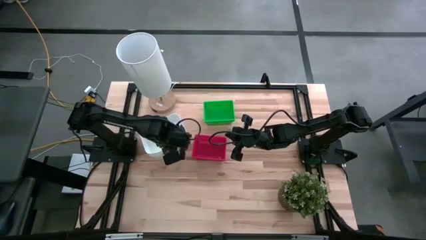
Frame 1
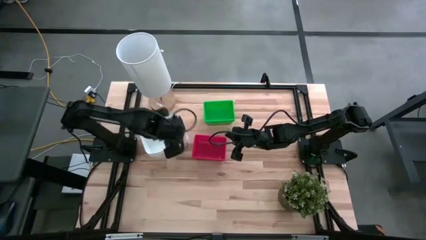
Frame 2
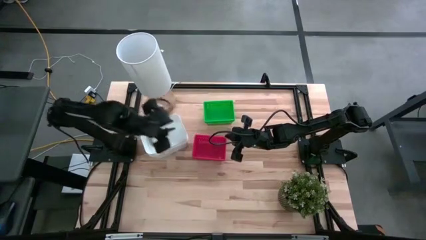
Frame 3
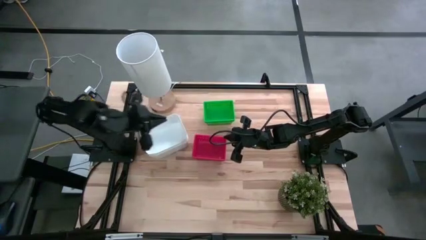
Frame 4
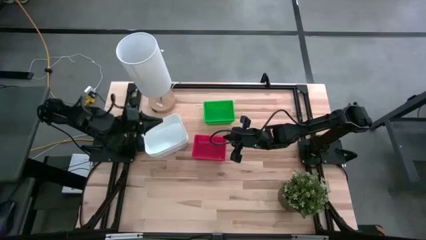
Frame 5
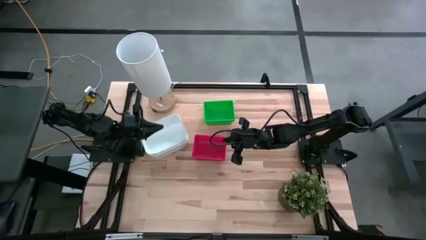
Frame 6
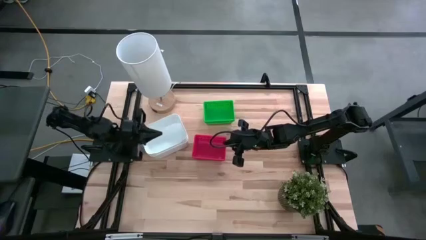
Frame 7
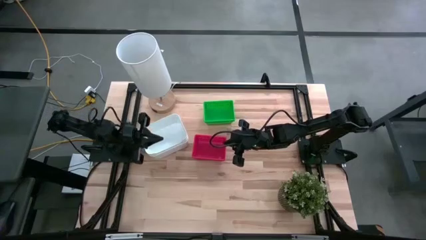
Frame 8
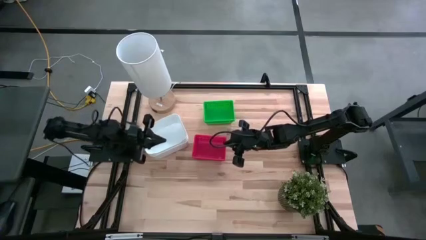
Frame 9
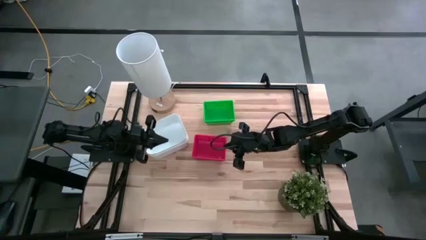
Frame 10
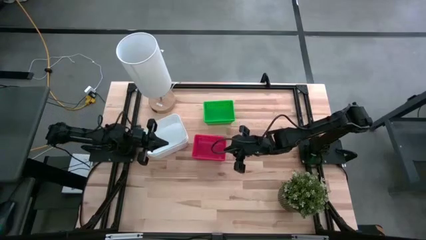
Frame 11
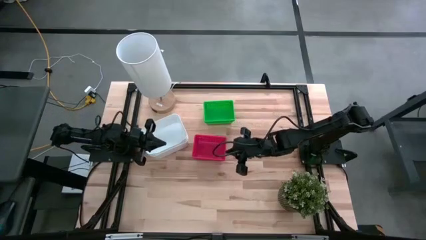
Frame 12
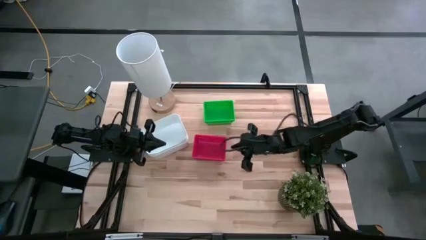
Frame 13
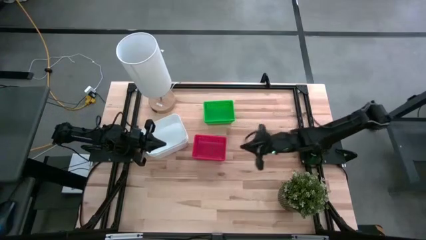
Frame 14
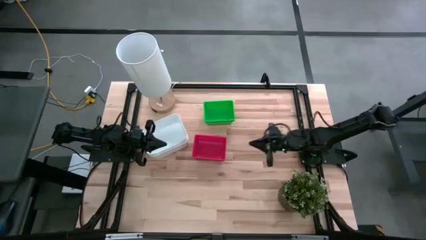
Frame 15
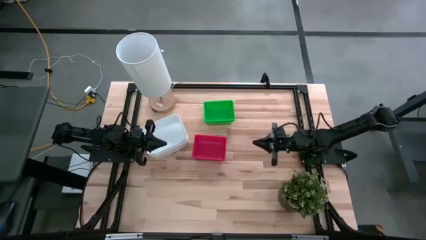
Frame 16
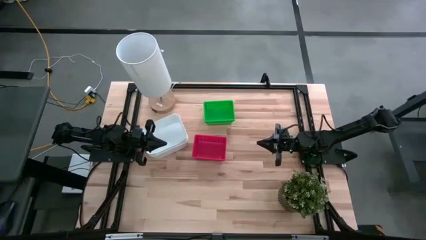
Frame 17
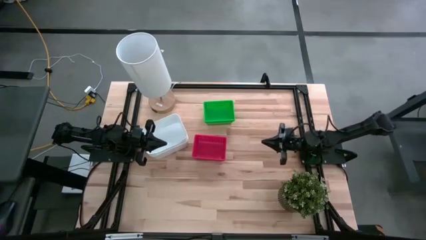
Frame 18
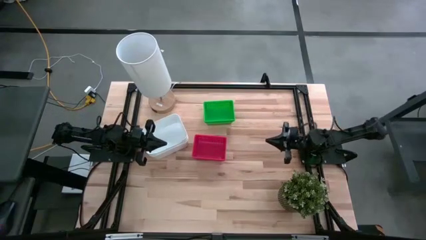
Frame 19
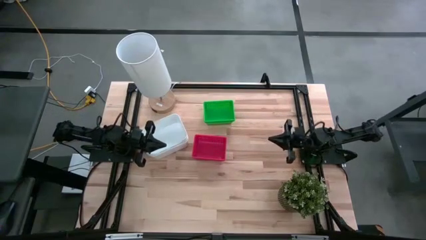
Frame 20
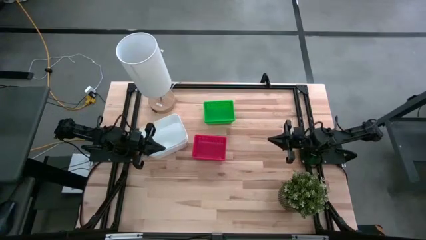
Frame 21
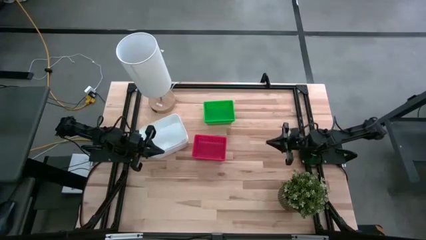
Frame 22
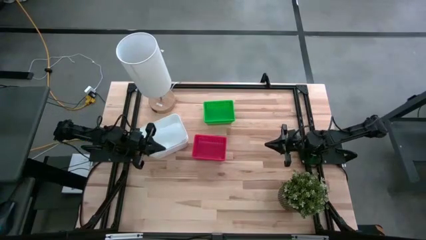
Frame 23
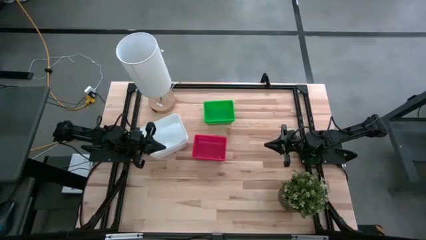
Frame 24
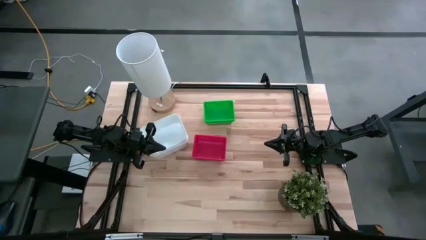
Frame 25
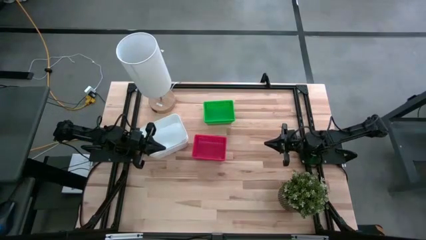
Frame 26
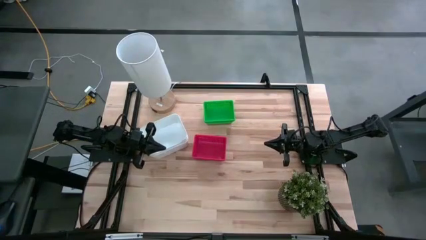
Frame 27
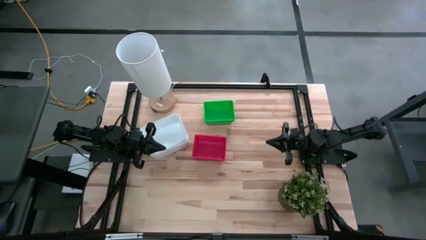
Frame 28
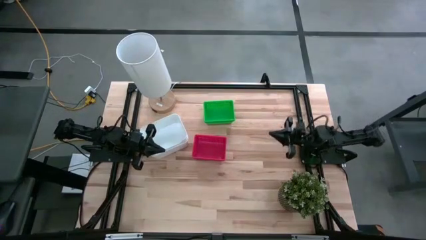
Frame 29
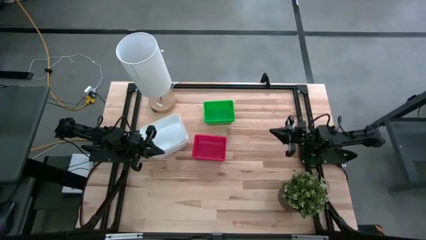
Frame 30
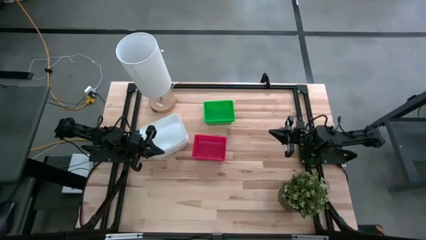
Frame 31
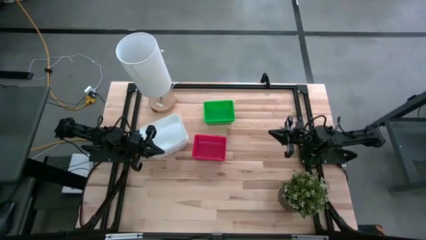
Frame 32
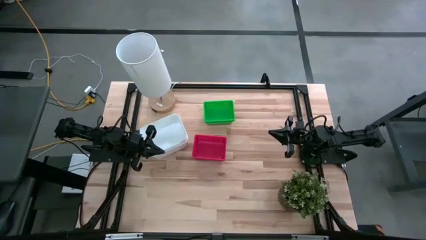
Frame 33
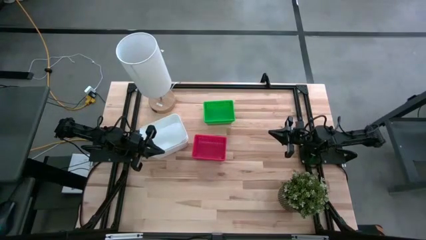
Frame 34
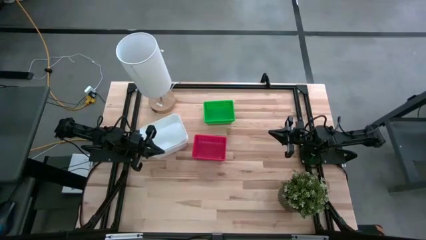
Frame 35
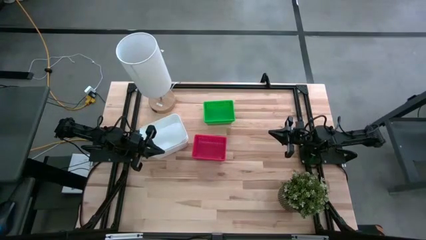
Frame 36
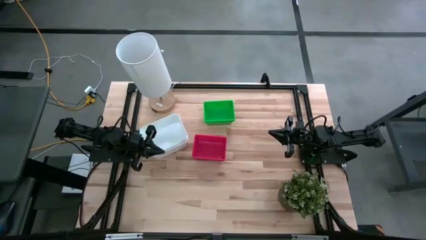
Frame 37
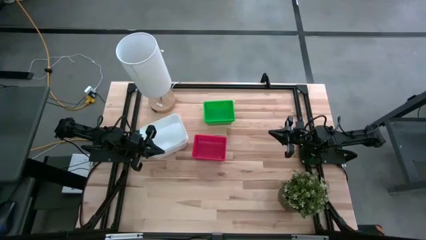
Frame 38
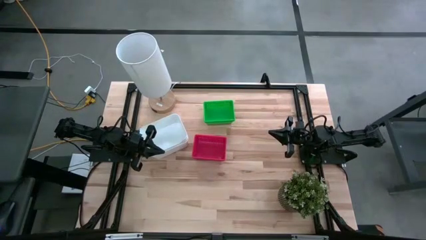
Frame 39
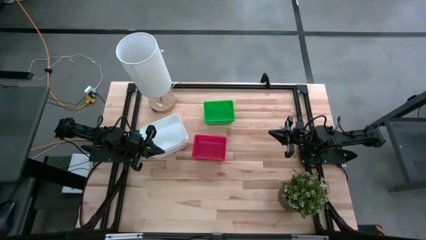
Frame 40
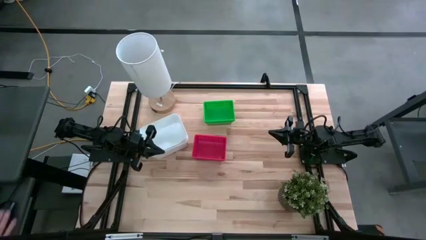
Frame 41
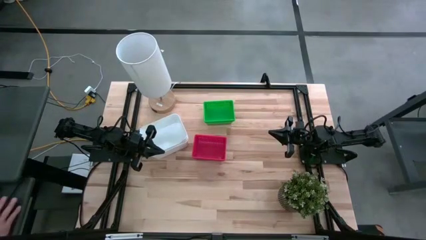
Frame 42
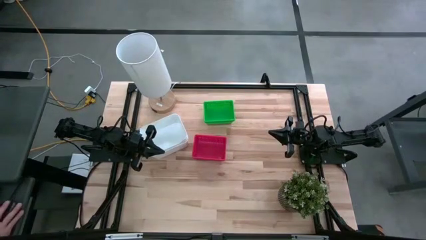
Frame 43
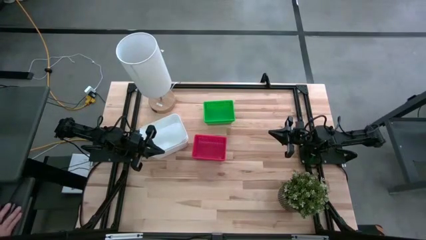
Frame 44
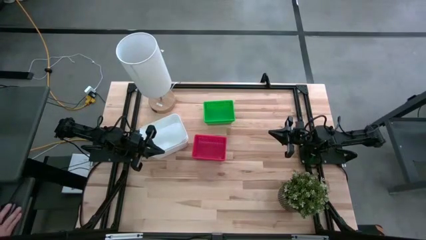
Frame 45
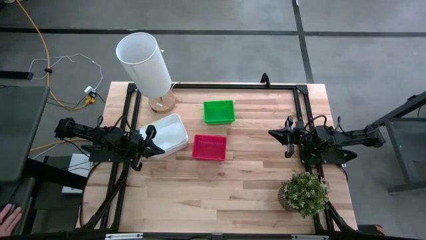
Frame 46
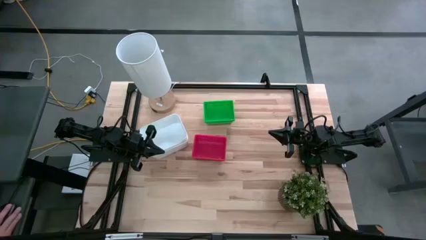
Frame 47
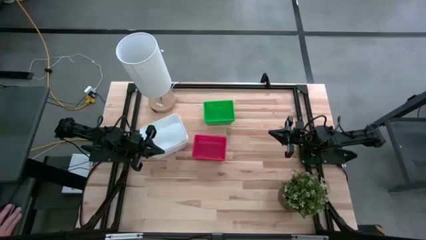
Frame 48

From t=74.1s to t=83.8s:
Return to Home Position
